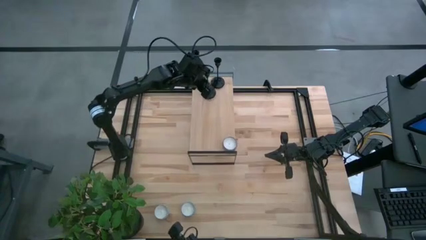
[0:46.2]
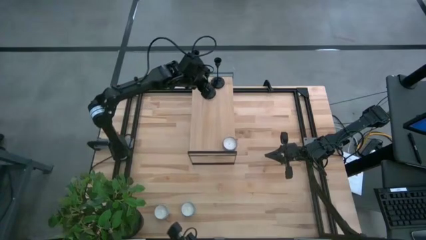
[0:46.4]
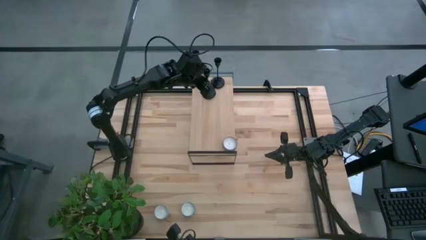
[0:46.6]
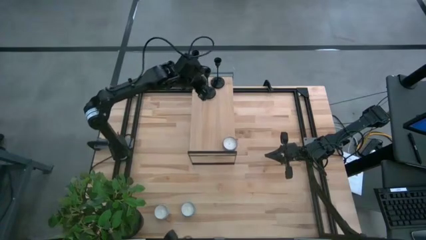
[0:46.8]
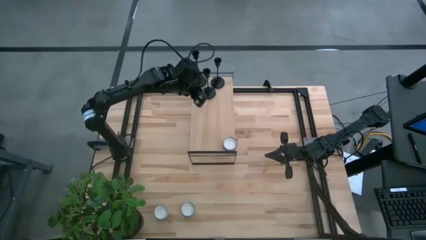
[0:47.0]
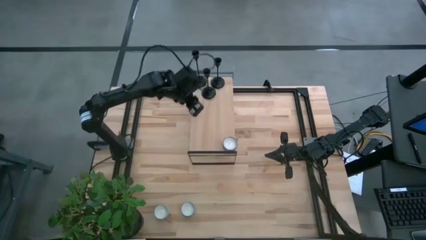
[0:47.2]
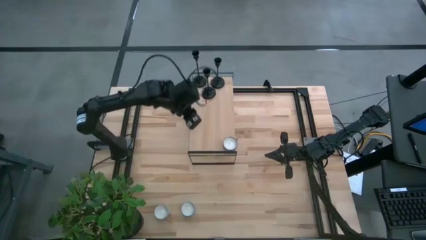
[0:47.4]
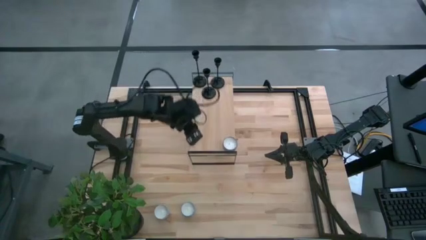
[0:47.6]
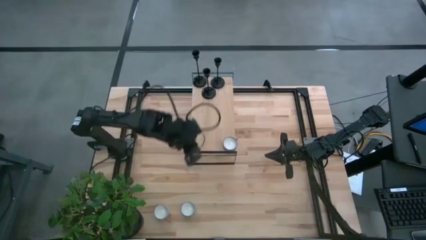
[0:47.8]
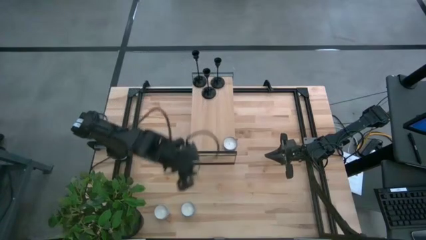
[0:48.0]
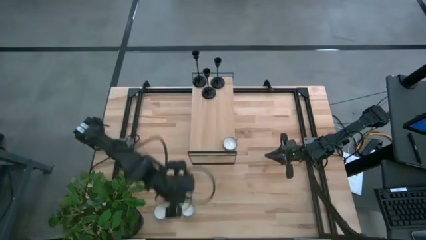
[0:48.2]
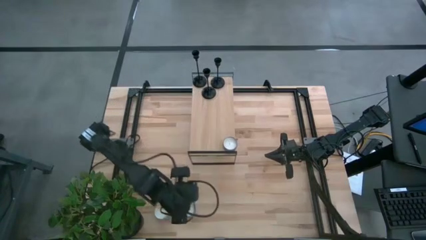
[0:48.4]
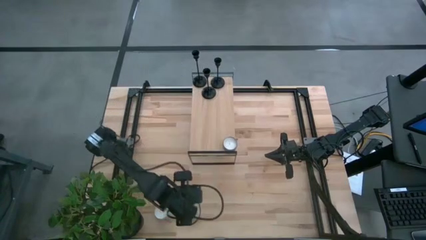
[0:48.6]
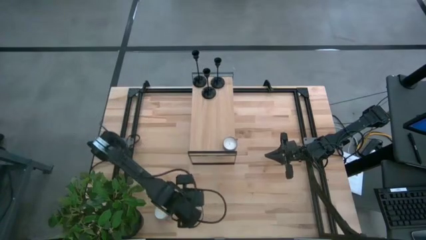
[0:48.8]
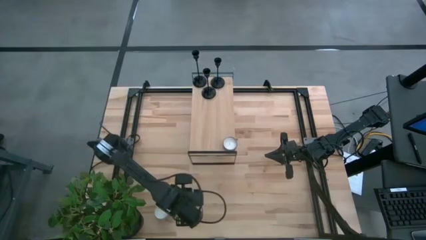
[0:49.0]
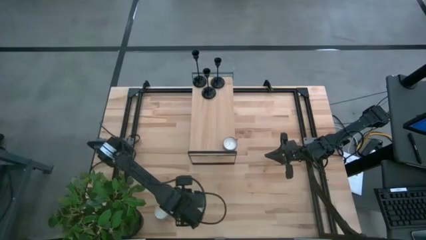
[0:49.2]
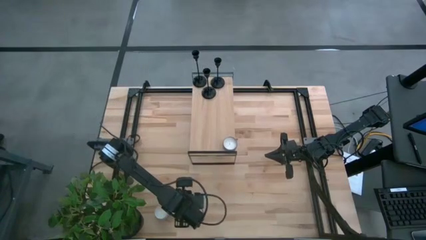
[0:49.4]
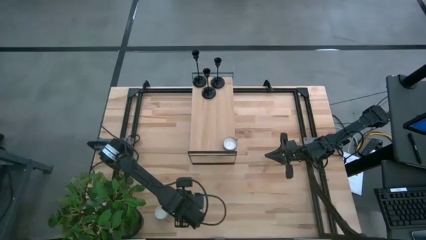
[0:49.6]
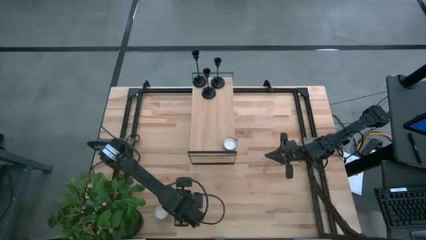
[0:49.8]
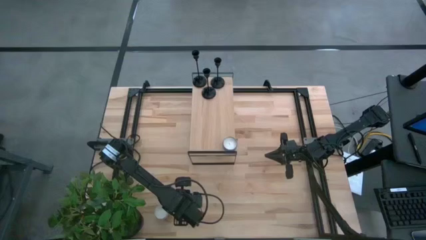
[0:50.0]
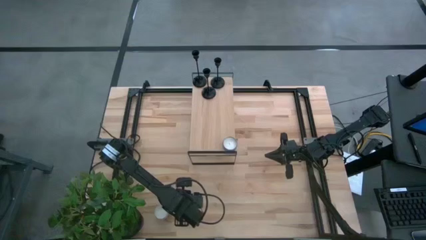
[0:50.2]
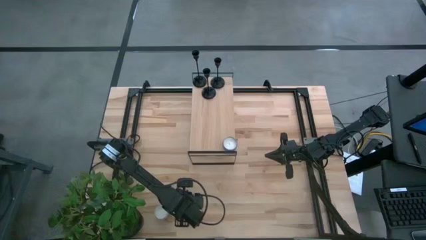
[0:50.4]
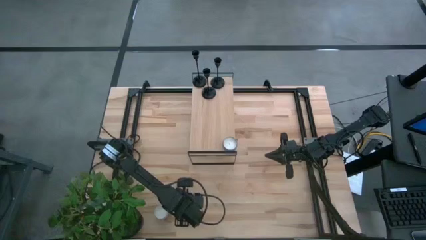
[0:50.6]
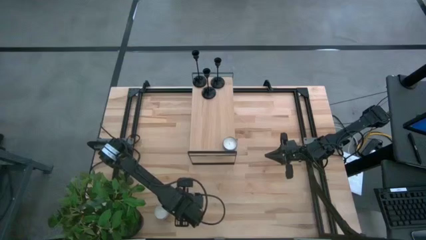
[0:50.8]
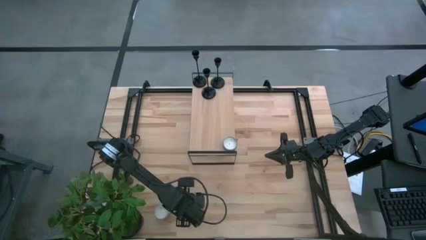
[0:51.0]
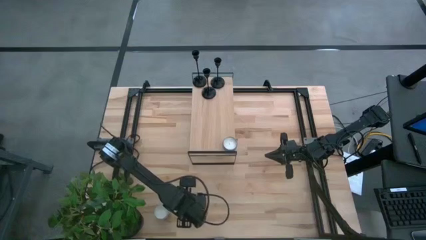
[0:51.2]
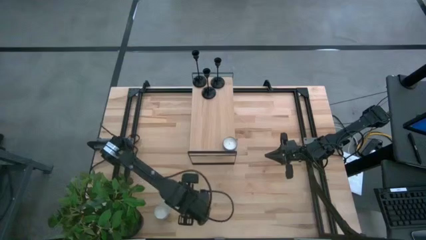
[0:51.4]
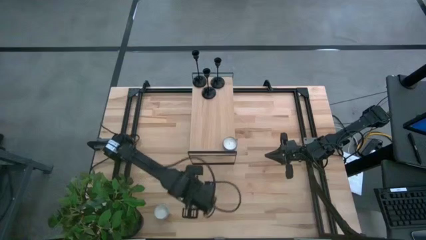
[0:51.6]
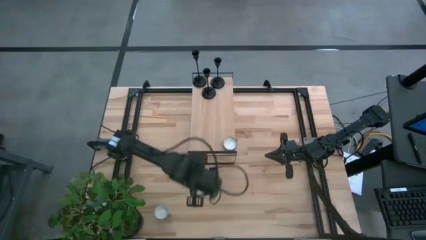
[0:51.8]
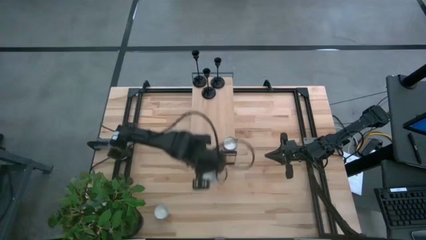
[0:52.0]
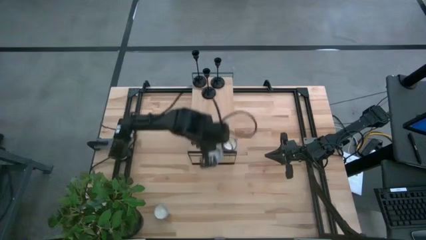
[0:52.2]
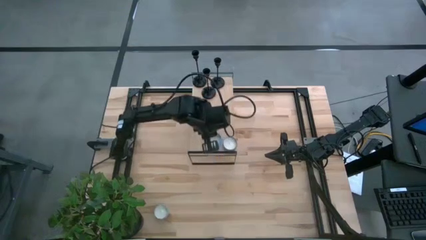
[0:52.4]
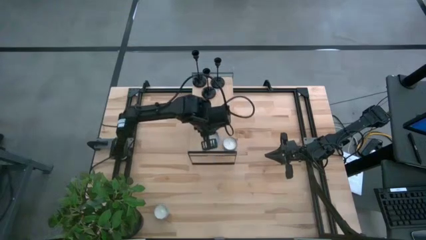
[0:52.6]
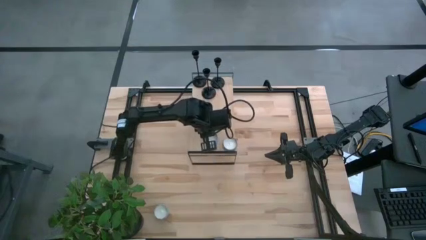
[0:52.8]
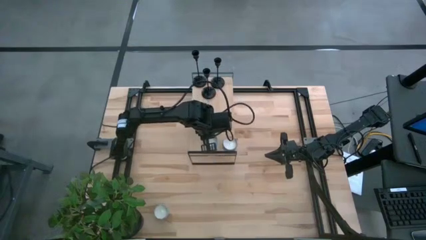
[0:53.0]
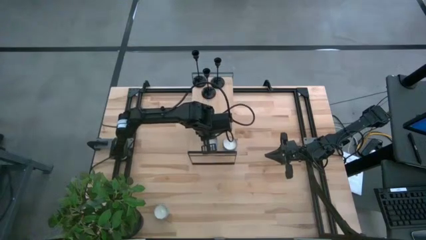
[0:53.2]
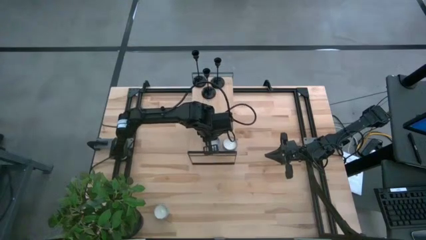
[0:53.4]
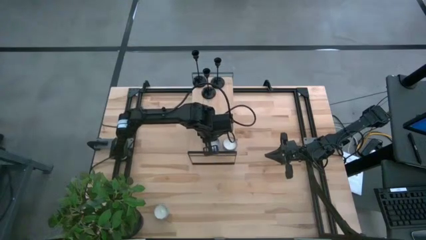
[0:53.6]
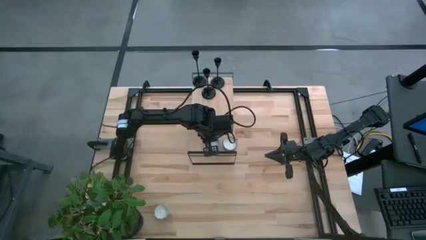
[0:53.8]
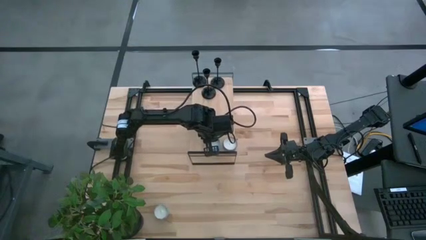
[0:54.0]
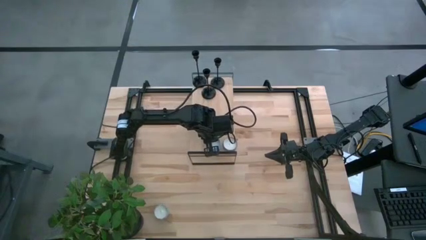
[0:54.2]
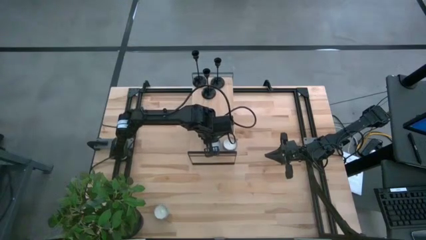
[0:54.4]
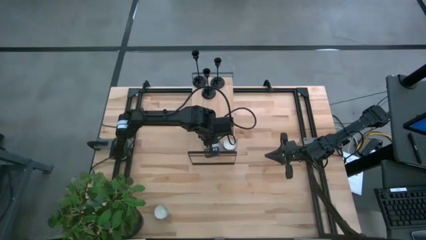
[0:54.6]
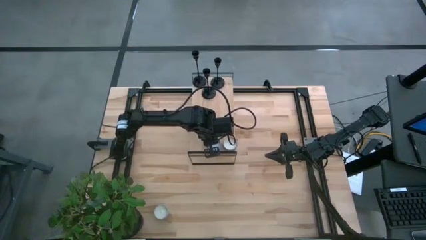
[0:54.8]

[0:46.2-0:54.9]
Task: Pick & Place candle stick holders
Align the blue scented candle with the pink scented candle on the shelf

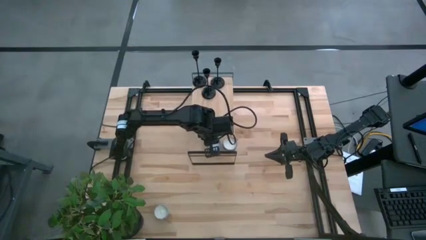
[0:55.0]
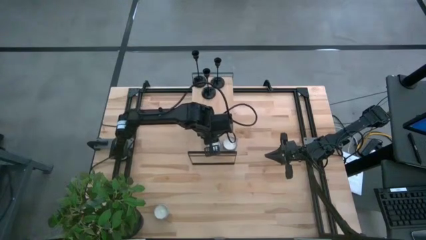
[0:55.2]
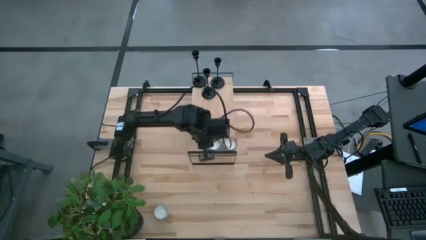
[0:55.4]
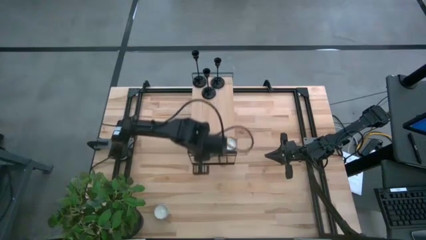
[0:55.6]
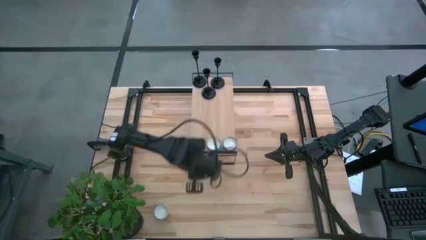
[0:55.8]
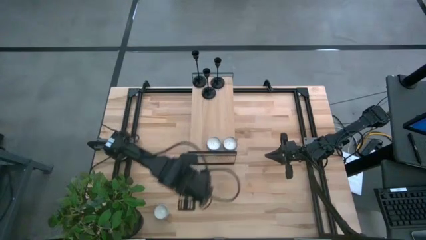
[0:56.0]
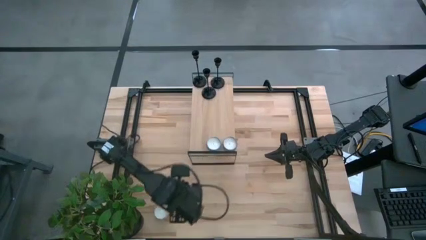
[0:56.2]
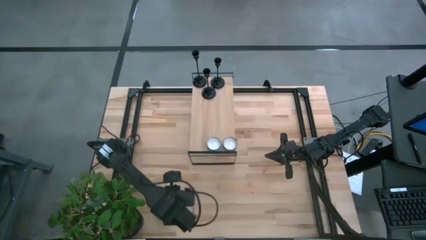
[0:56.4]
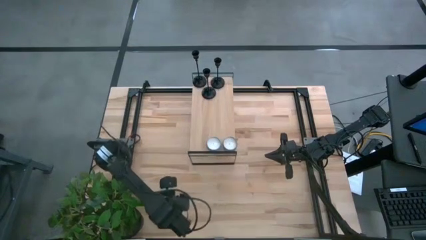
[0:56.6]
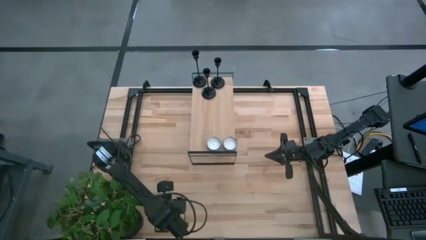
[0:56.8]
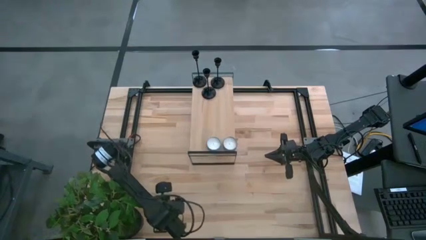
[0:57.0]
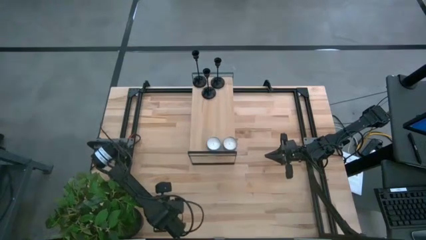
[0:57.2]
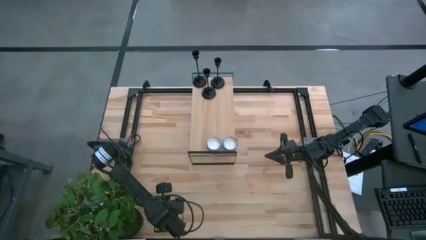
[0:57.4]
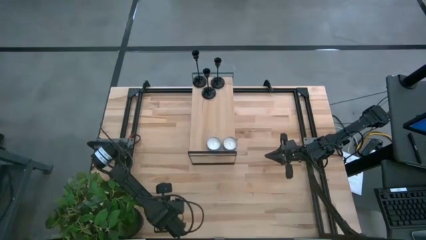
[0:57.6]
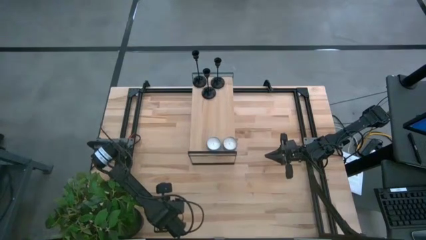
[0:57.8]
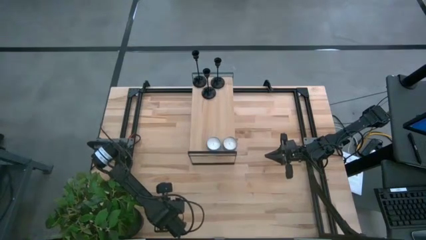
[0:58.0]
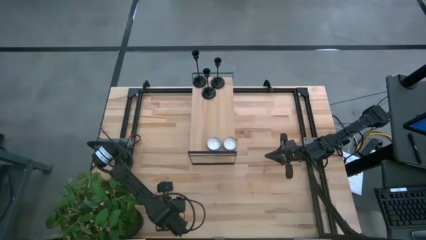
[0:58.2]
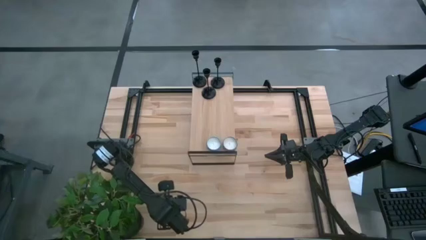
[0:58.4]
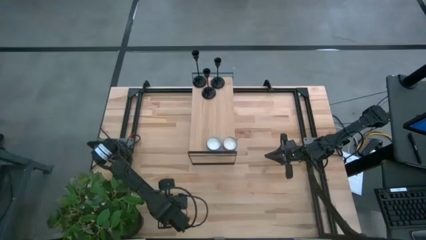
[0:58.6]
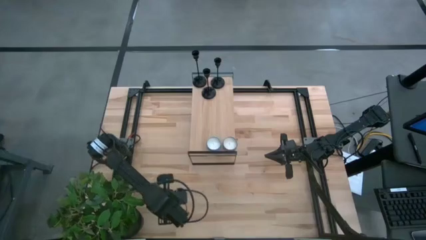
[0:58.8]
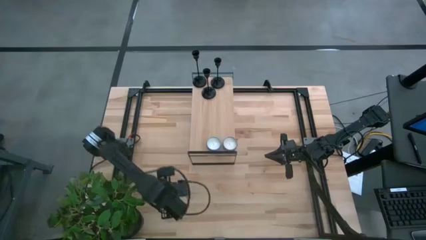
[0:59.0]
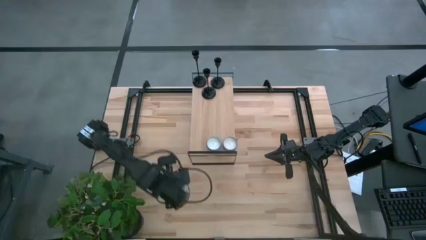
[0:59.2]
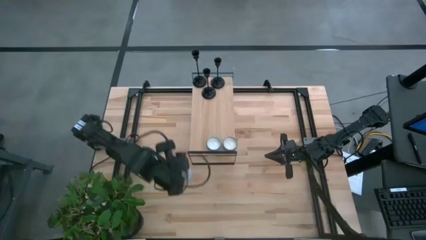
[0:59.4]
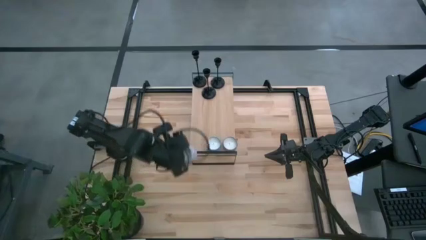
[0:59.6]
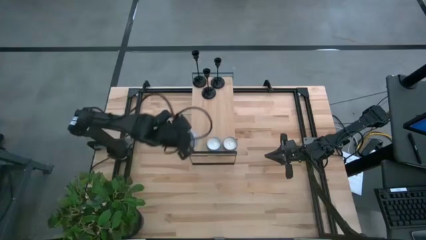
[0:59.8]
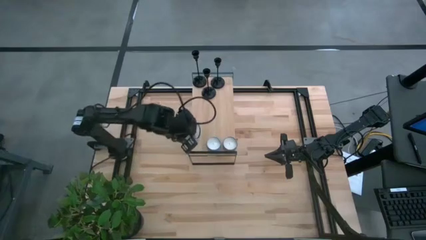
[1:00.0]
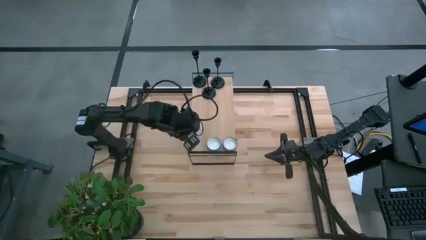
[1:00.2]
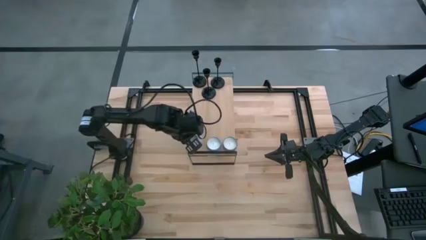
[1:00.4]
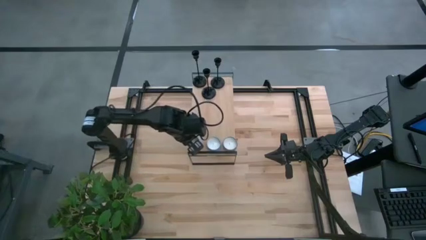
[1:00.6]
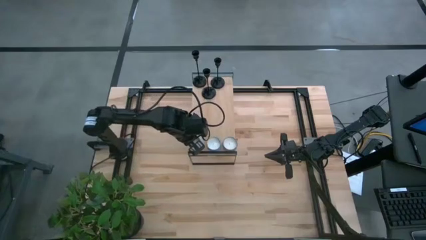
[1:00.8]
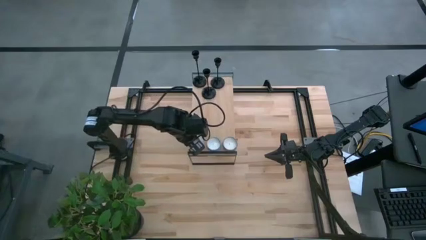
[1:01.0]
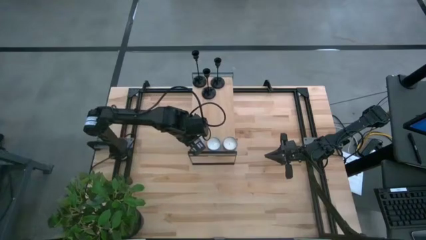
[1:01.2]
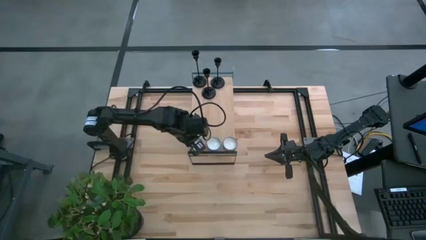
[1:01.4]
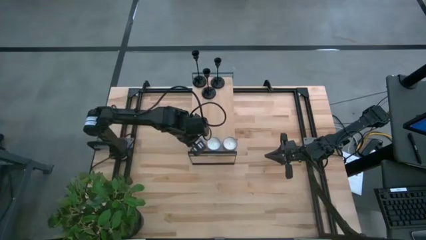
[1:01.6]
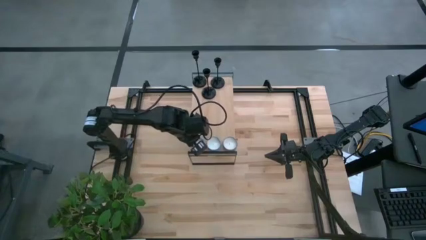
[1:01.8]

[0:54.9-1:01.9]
Align the red scented candle with the blue scented candle on the shelf

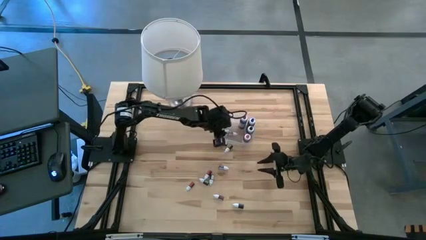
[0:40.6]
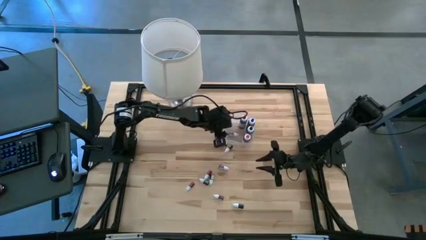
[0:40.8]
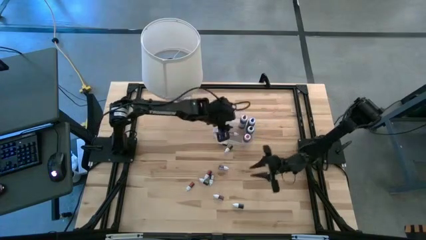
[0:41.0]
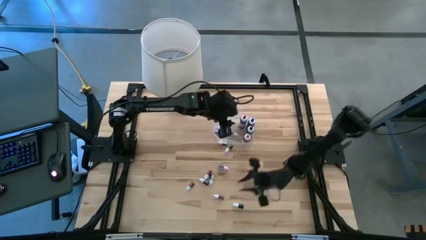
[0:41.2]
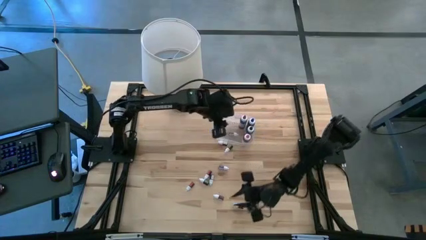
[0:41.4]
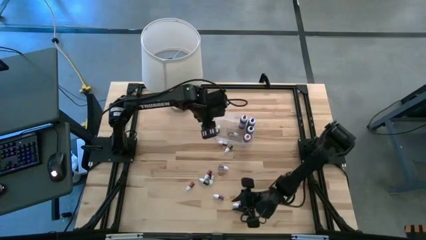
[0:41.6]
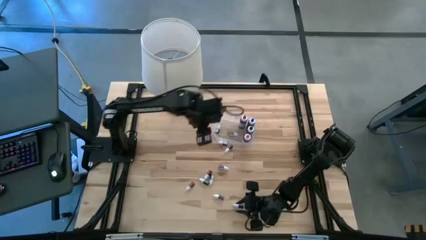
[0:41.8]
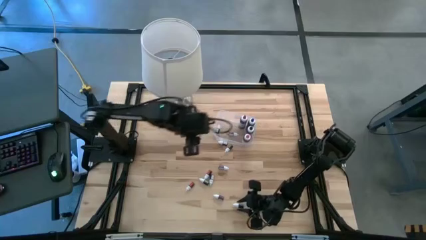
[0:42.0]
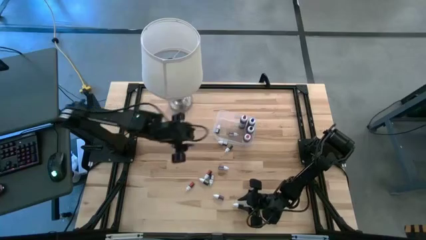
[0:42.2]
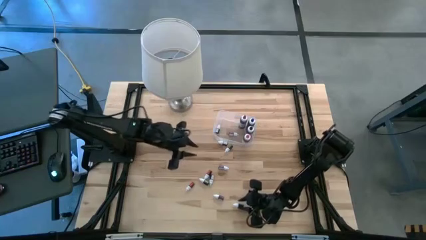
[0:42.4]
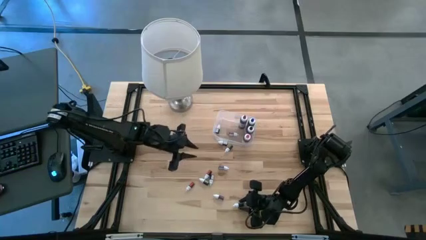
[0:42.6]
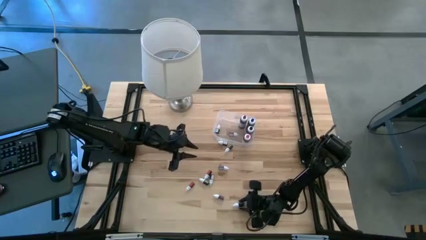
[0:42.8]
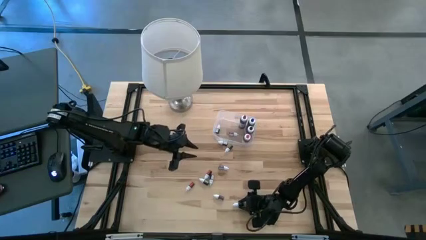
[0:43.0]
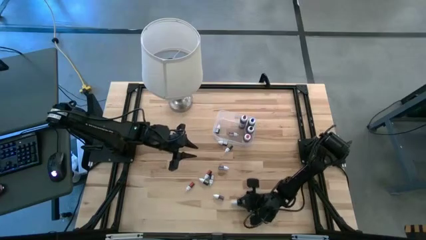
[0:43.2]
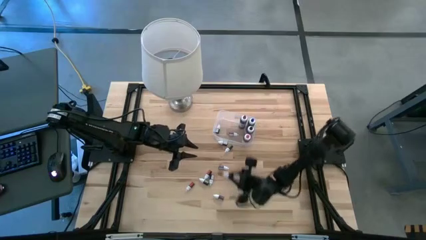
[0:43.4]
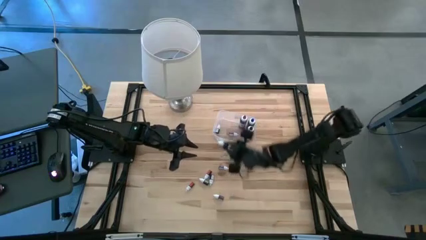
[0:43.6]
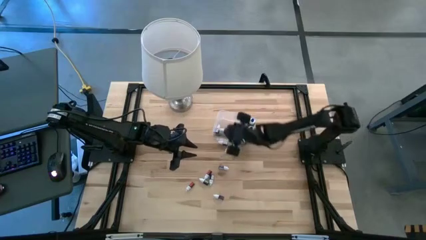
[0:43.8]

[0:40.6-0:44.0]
Task: Pick & Place food coloring
Put the small green food coloring bottle into the transparent bin
